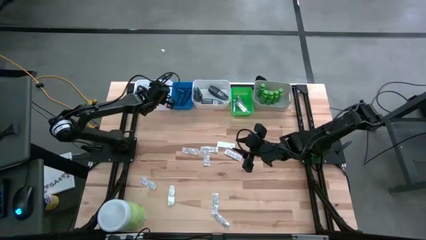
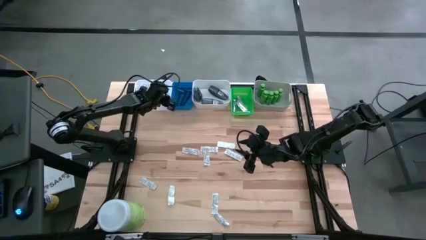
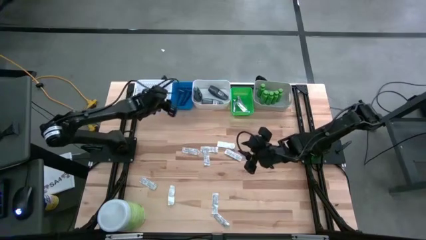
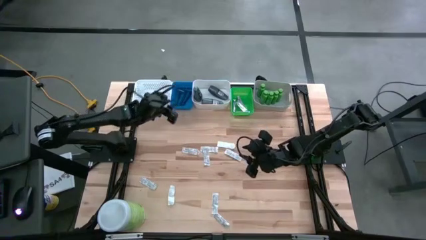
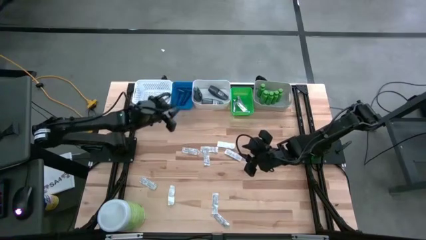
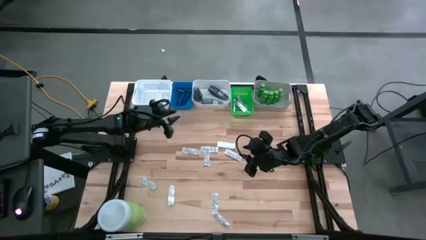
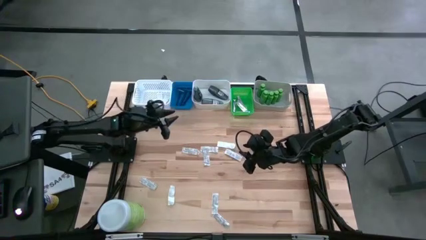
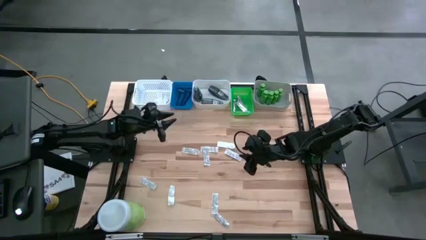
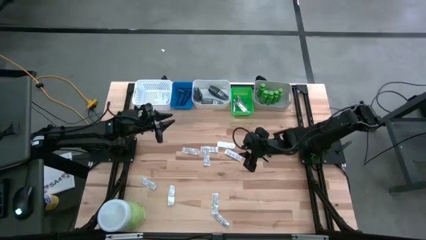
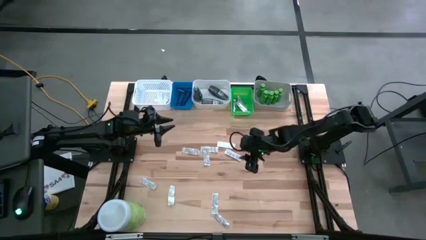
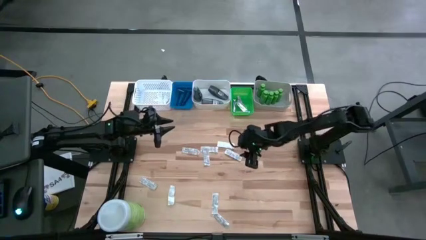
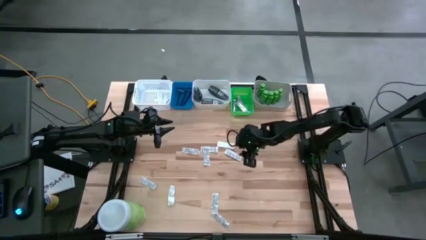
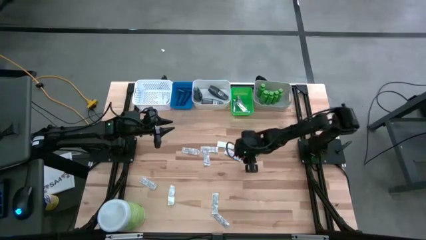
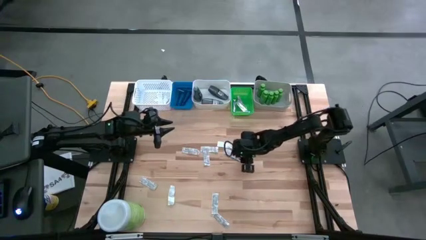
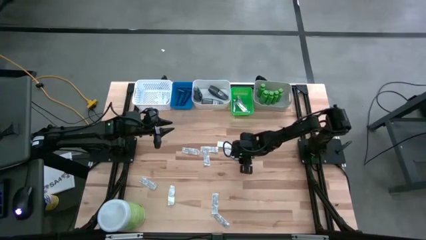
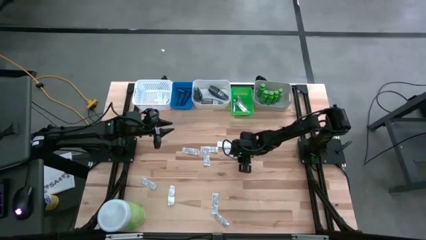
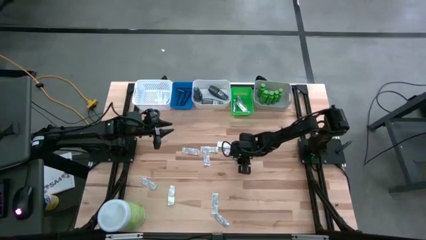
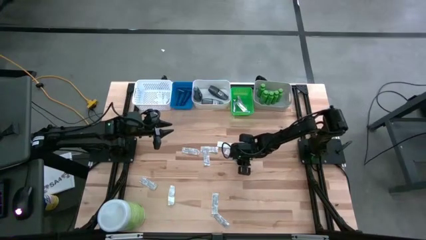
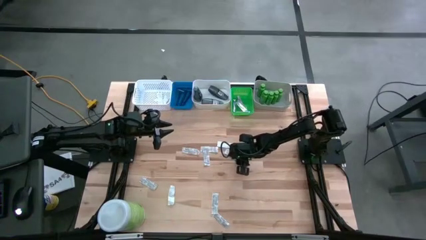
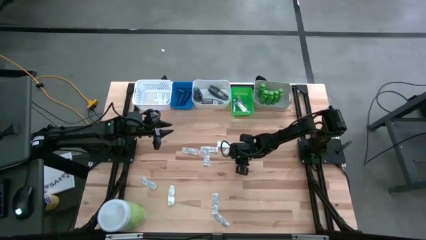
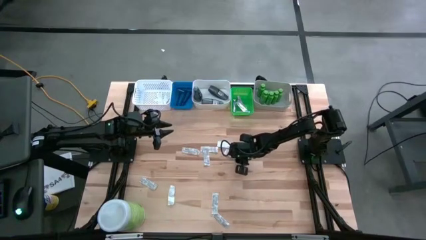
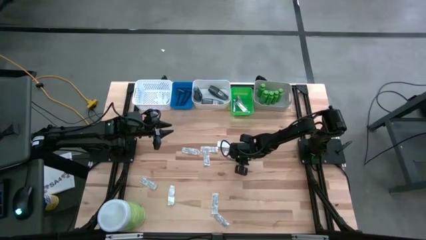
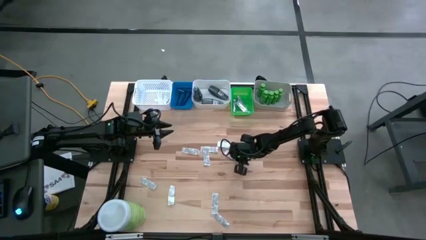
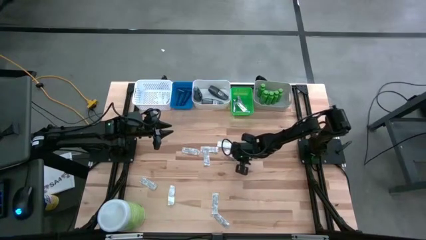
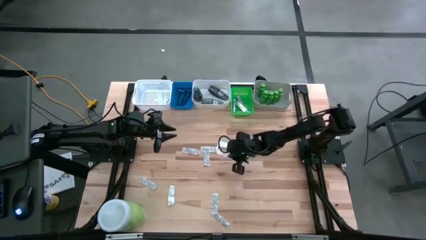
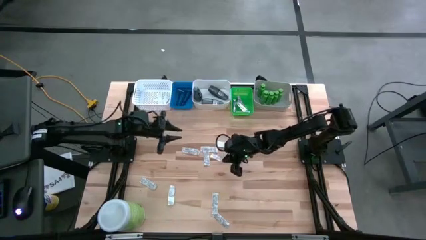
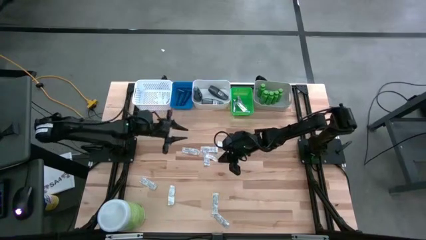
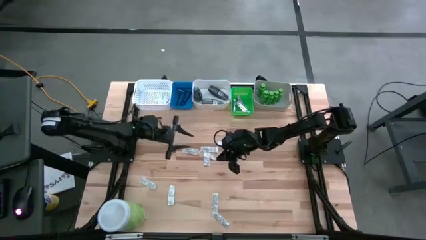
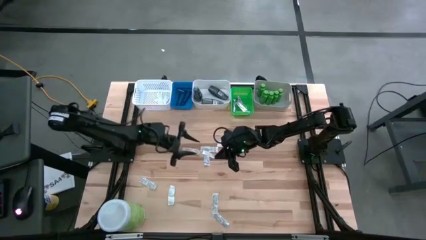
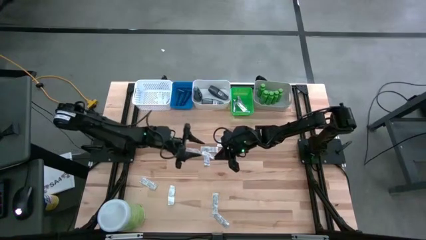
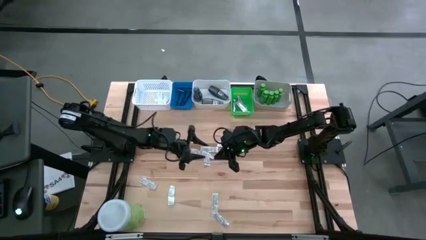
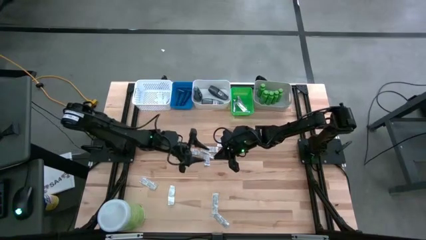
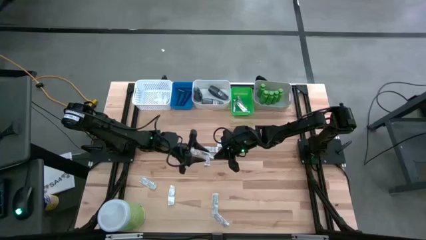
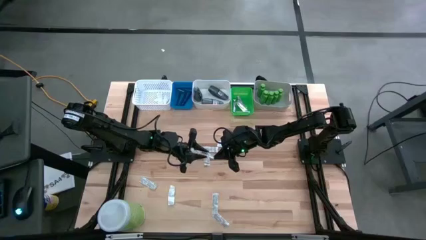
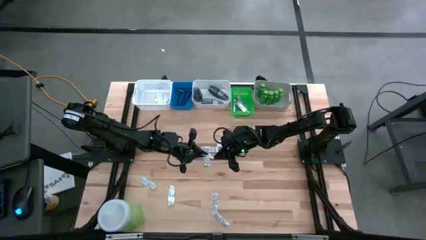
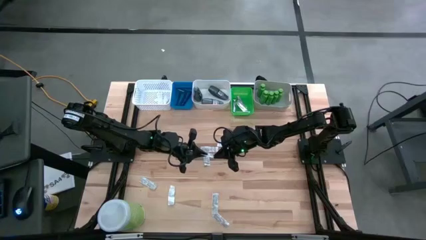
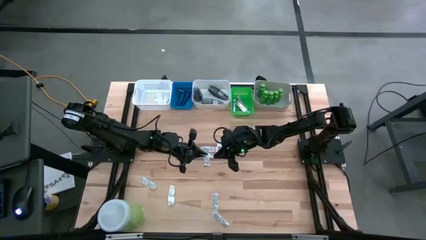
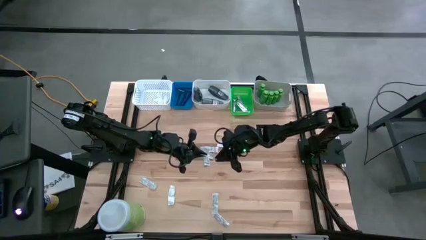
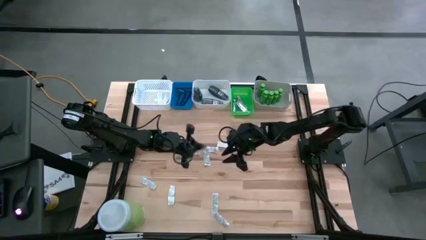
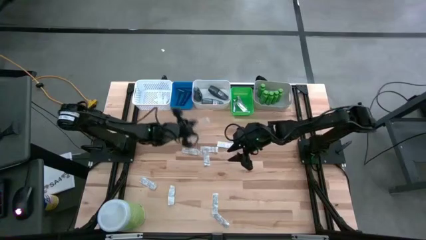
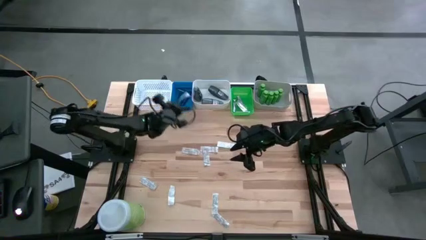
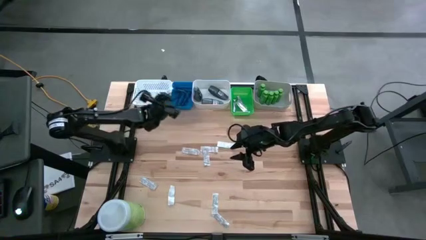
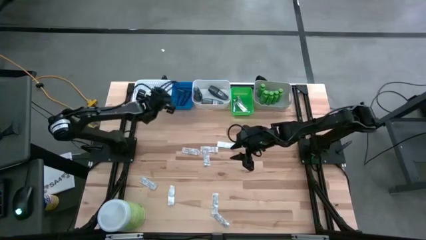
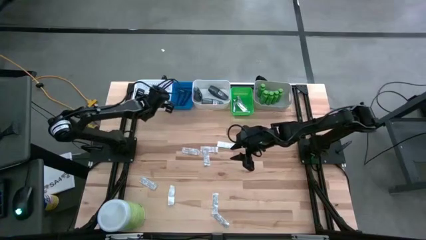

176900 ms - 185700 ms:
Task: Pick & Place Travel size toiletries
Put the bandage pack into the left white bin

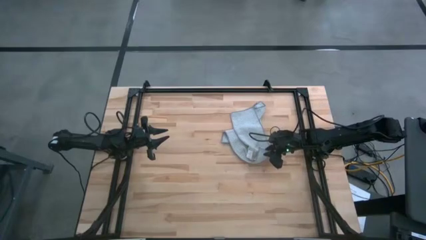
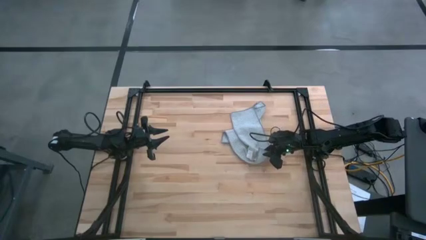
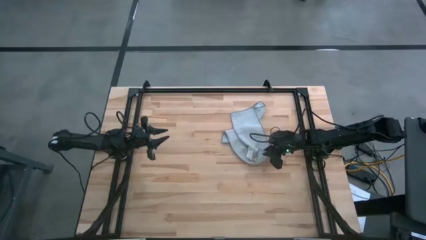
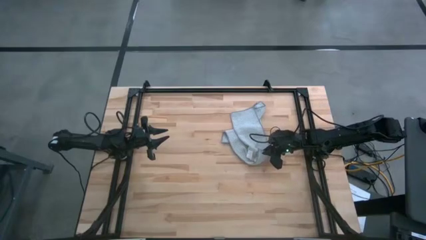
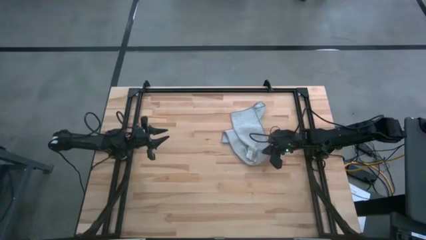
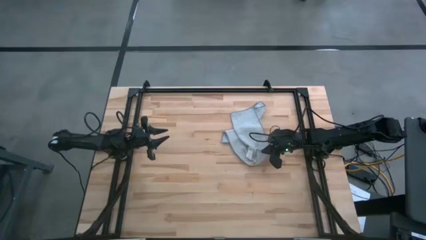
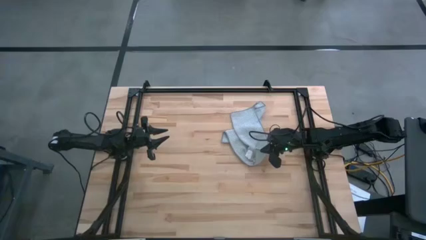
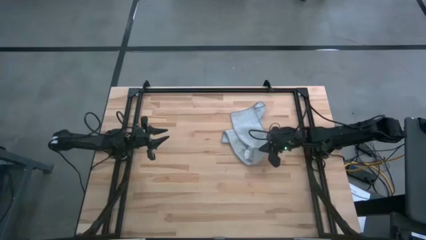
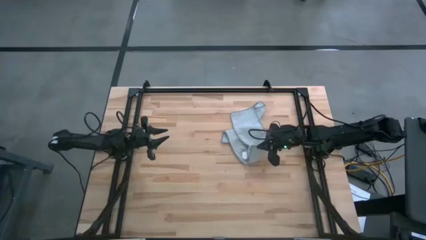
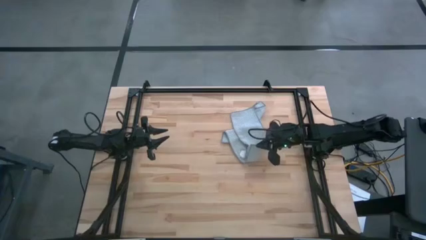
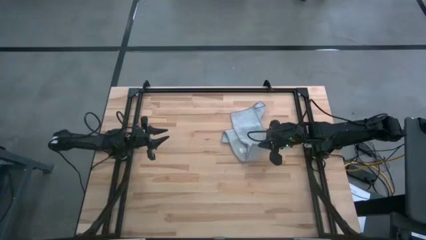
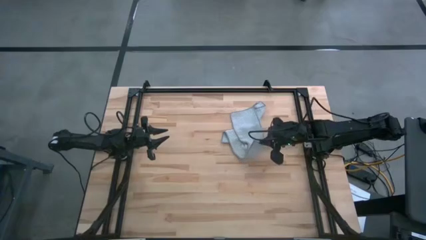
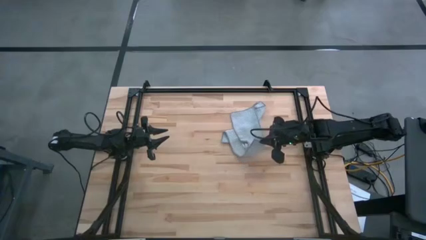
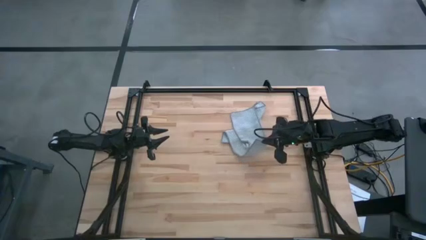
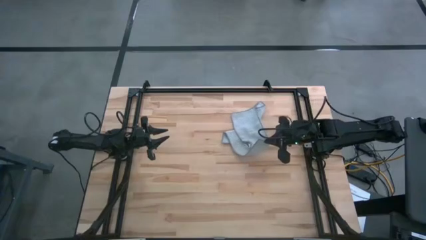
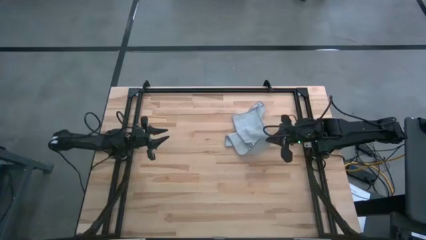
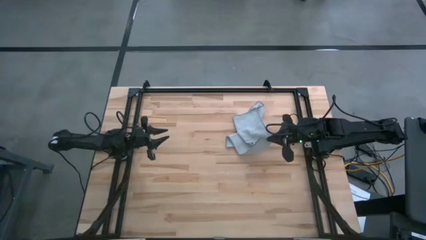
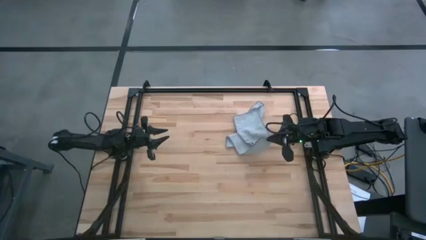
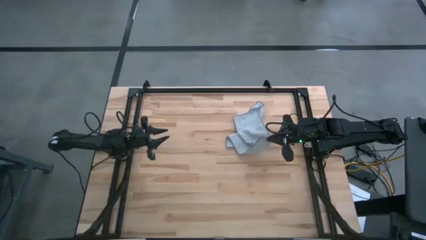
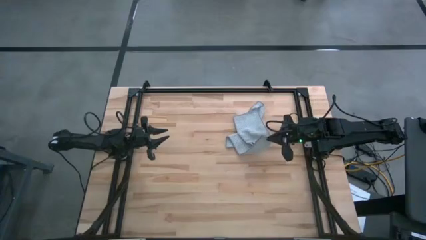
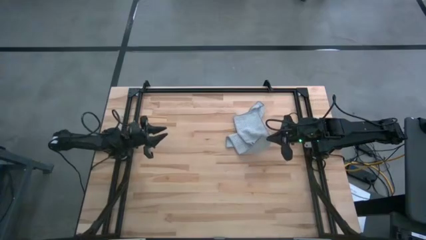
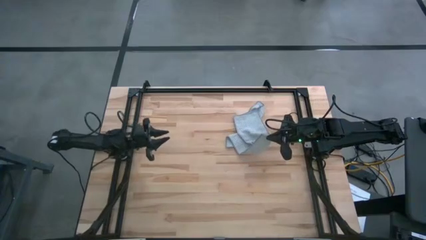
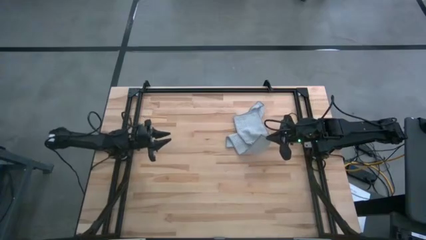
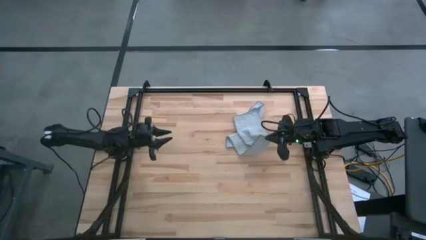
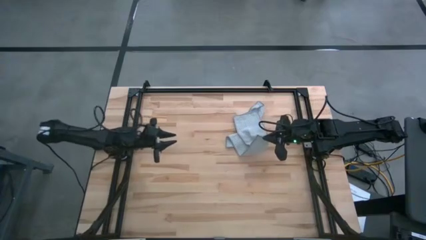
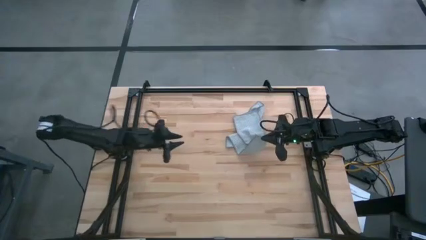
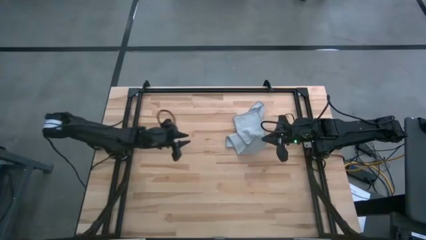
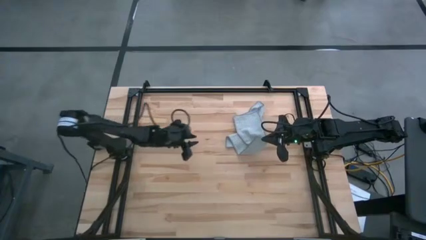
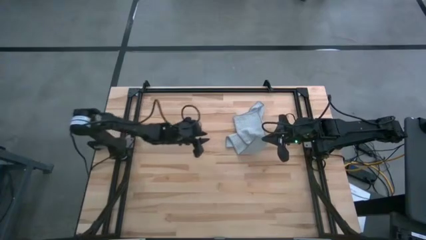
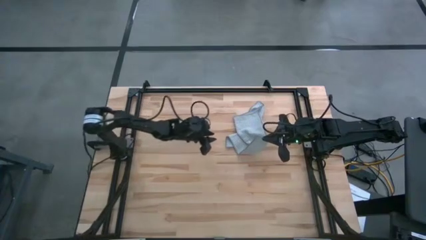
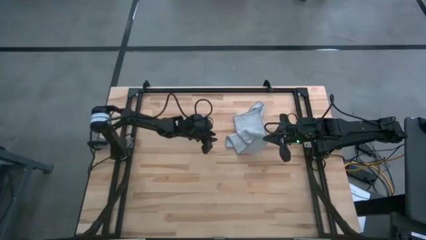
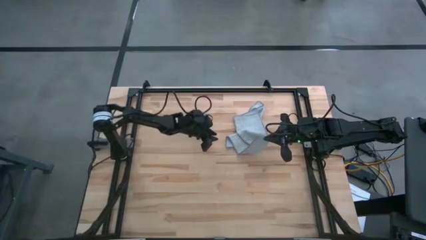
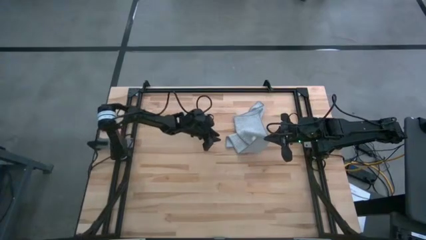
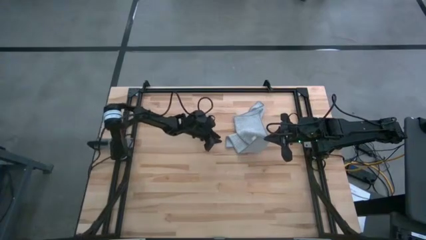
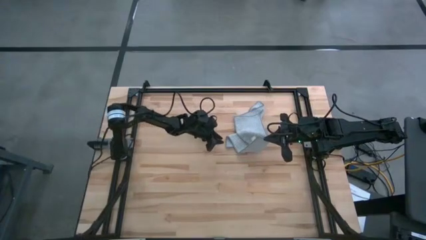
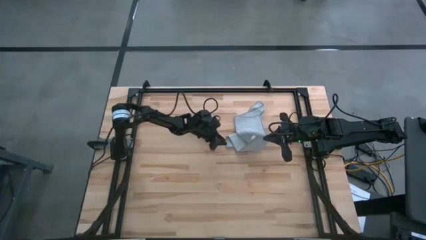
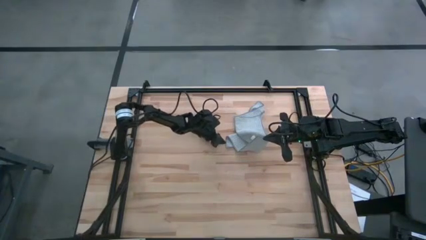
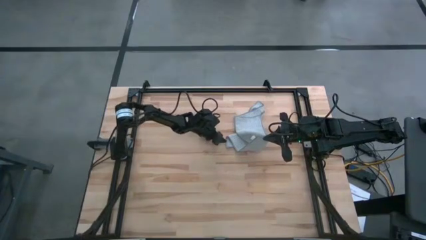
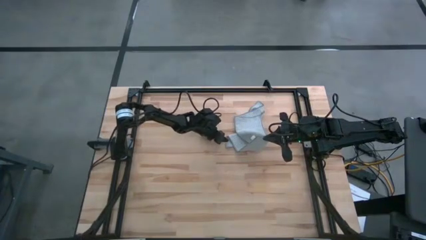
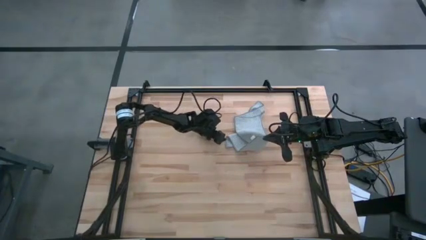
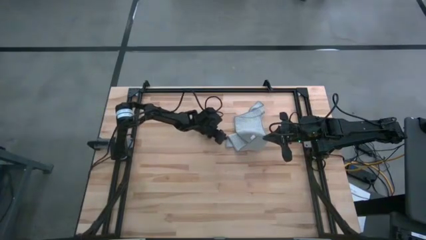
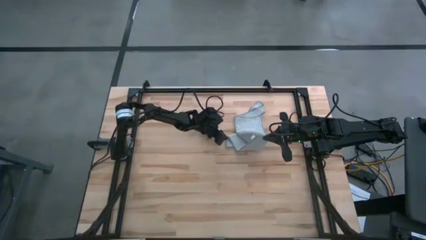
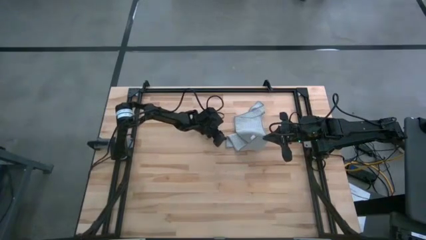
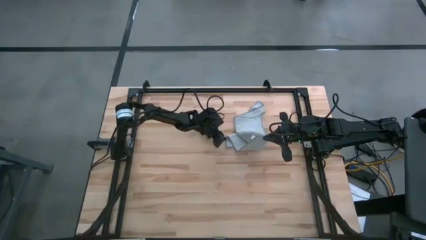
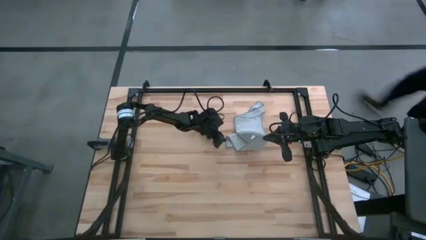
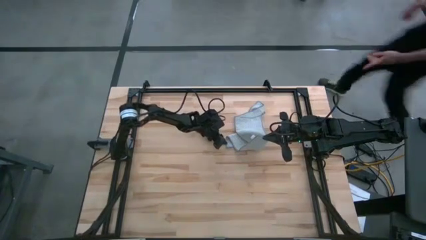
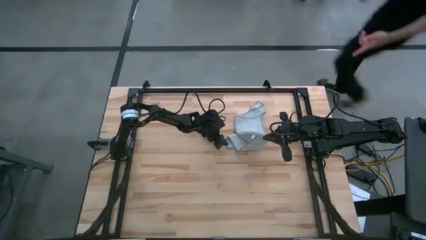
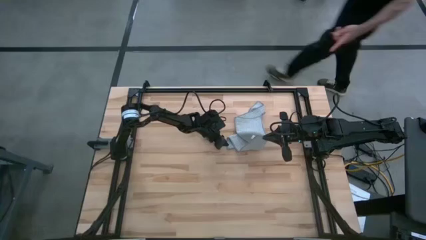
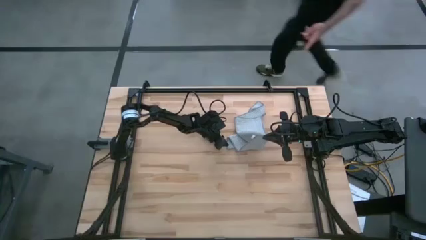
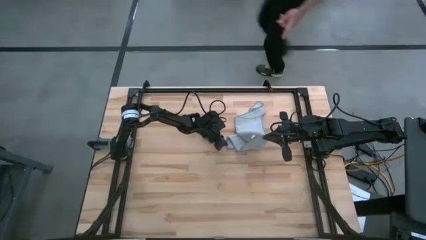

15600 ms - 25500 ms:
Task: Fold microfiber towels
Fold the gray on the table
